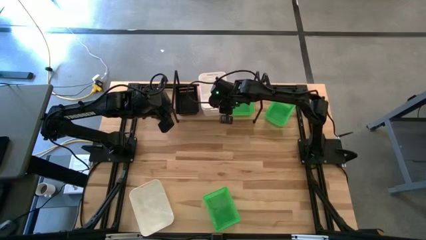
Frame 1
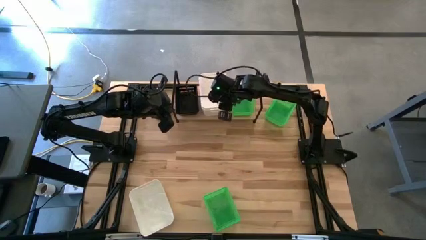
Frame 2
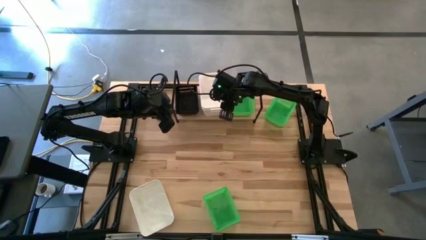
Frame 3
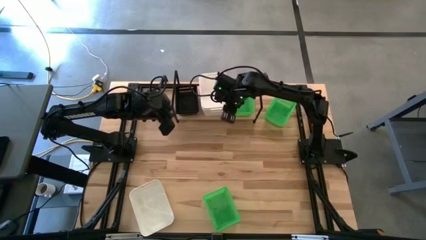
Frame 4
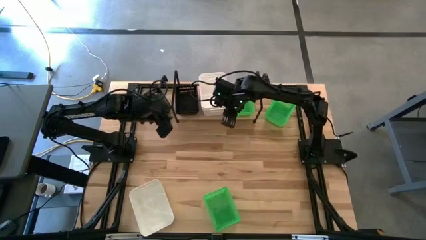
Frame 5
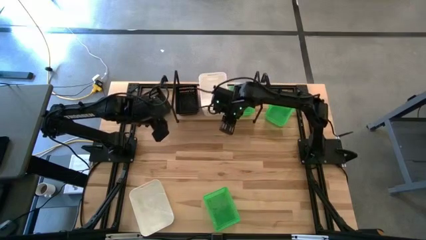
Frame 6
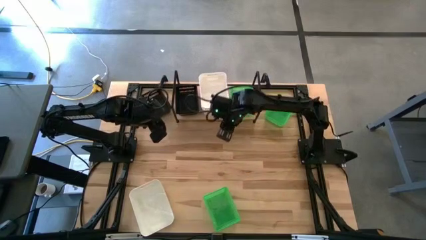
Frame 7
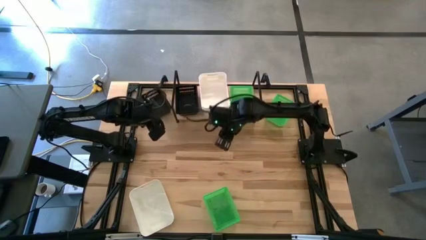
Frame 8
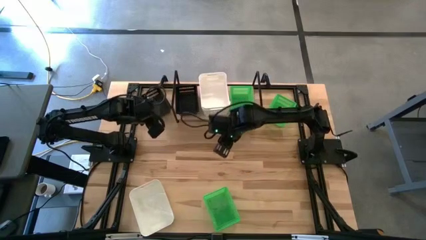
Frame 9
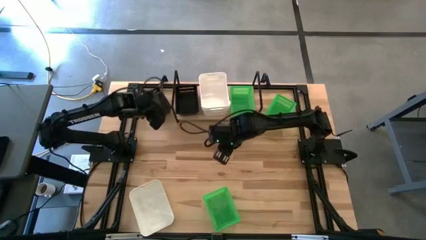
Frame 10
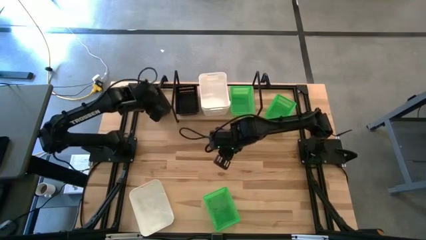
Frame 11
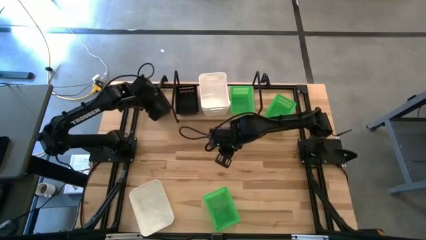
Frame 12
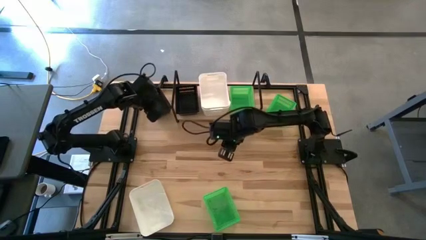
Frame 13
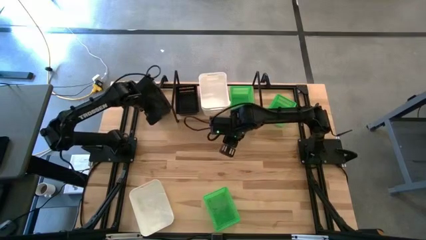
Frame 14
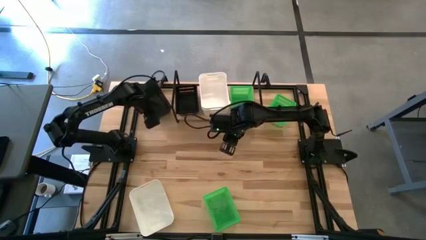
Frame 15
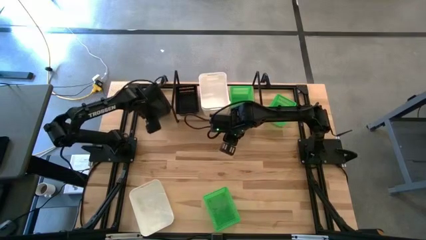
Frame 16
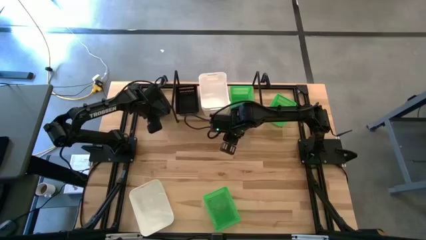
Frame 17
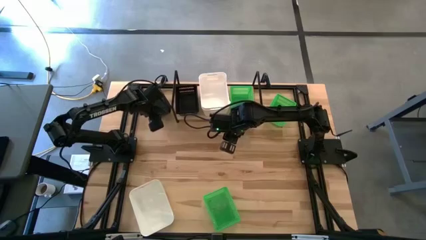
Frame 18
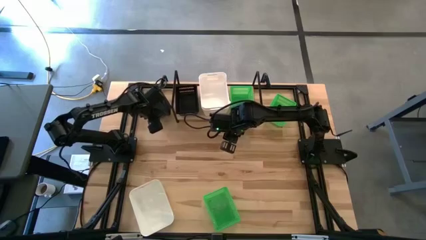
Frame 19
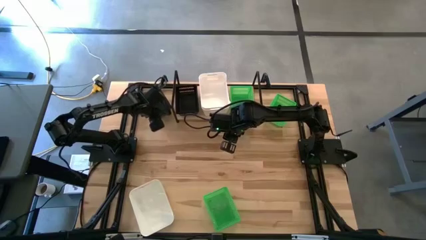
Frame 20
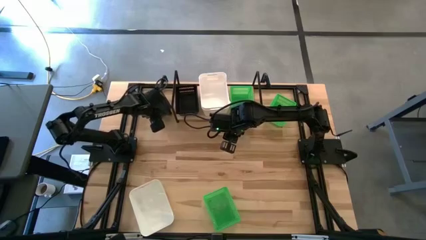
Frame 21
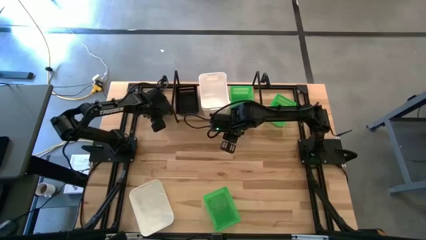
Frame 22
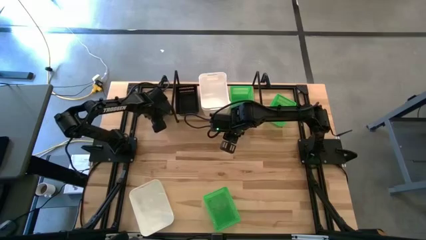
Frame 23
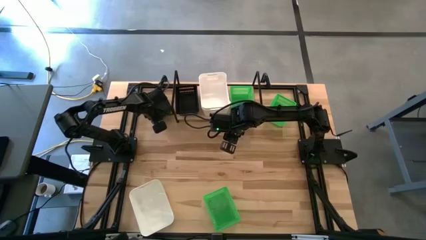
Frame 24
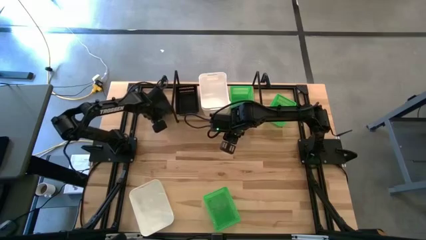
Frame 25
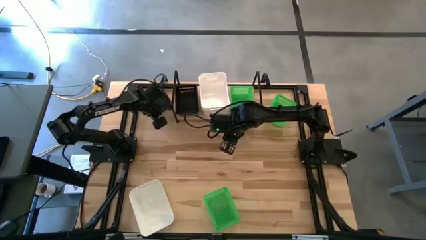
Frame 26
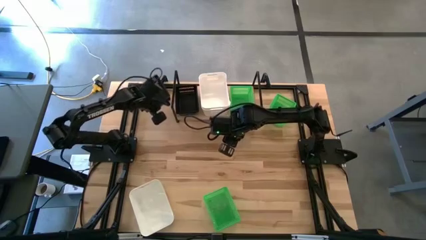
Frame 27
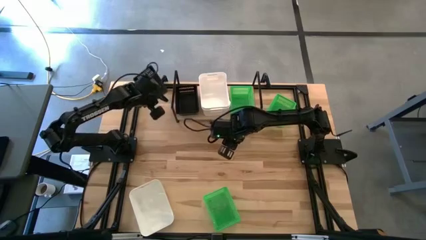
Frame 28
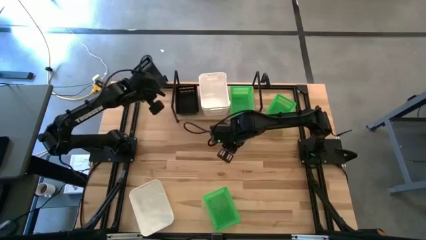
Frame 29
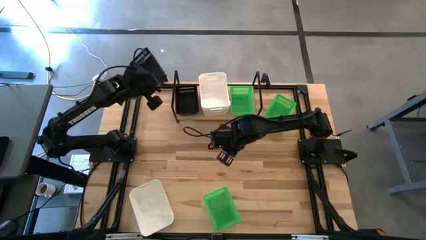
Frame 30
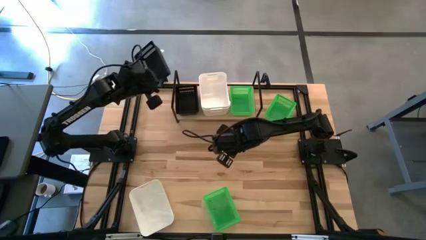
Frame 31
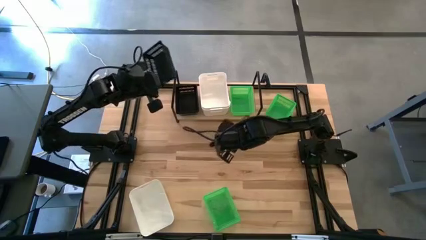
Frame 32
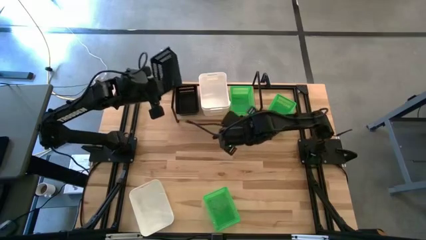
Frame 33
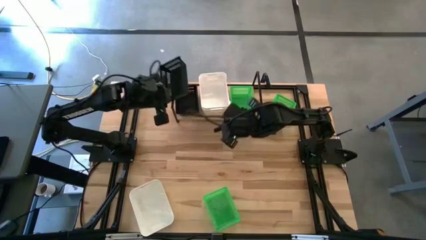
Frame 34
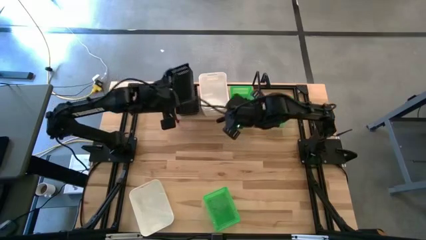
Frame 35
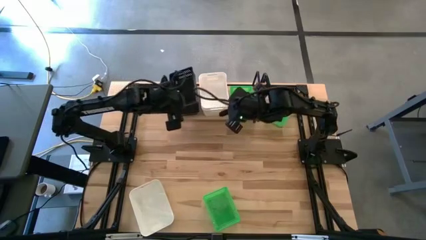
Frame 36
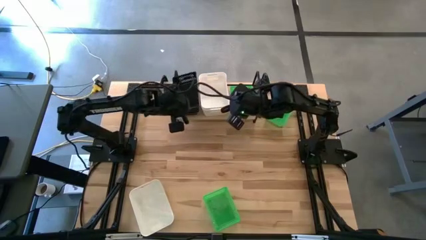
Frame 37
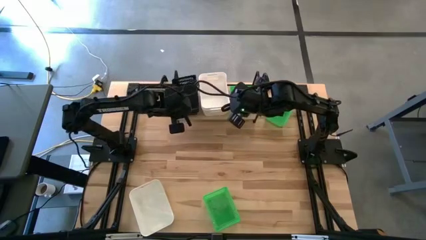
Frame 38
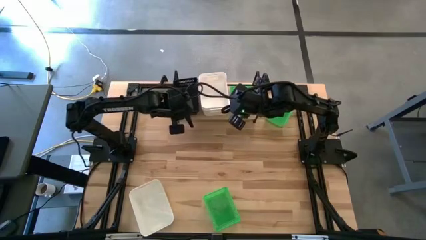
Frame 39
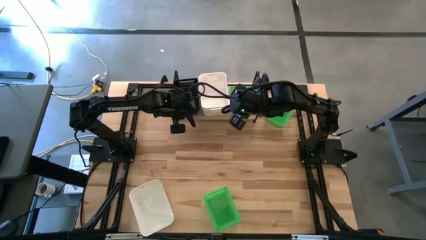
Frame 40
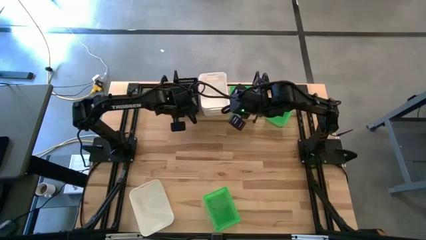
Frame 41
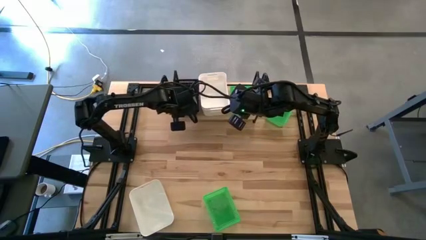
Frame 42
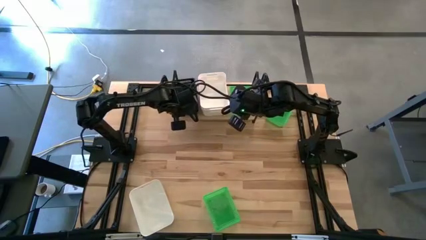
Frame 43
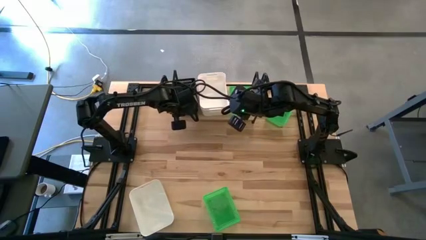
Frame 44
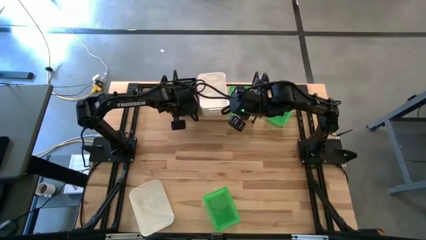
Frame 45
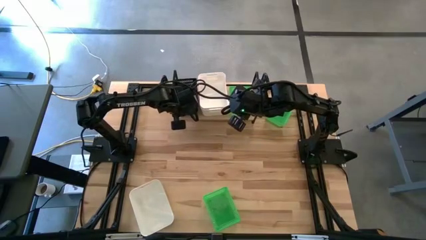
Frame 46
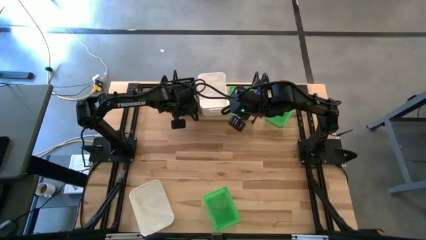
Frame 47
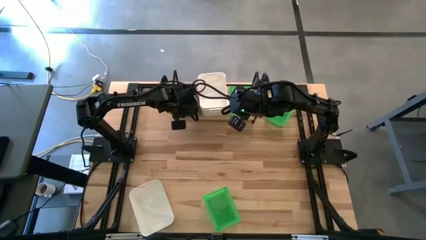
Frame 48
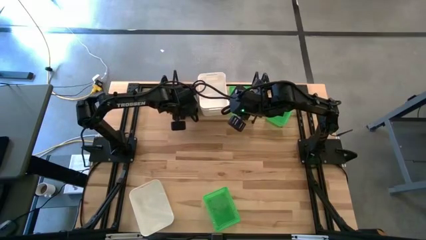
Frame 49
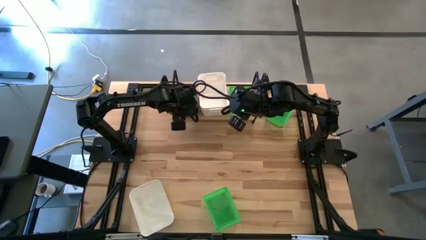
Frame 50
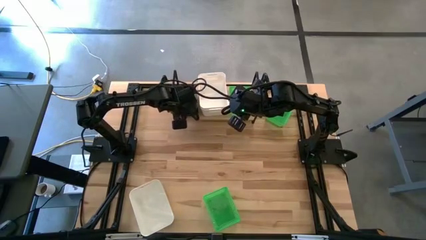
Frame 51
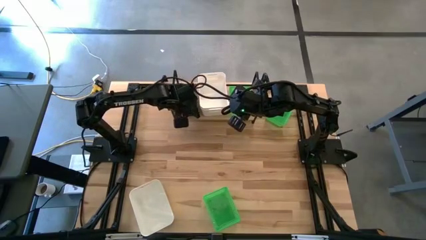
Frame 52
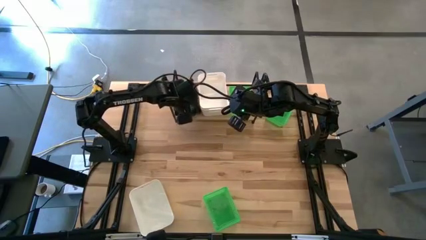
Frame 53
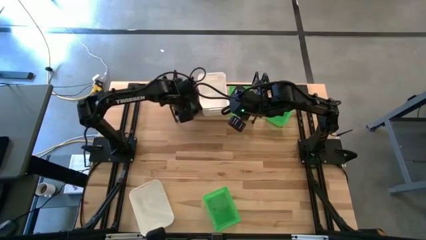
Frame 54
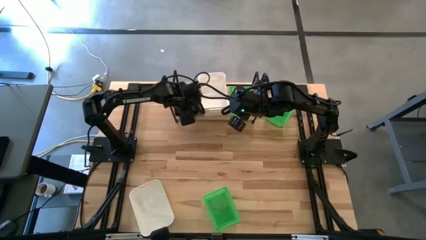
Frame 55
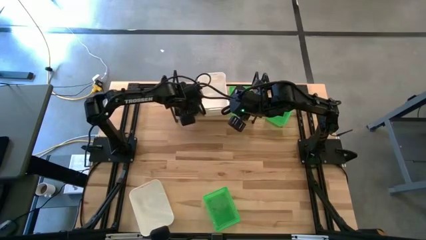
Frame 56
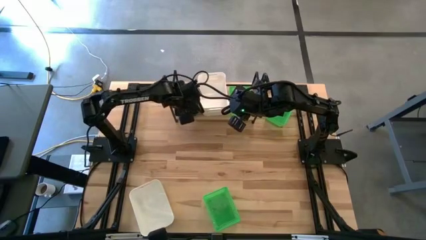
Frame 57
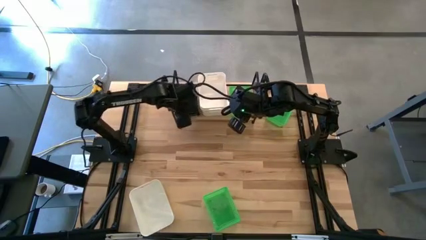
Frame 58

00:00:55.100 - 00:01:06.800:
Task: Stack baskets on shelf by color
Stack the black bin on top of the black bin on the shelf

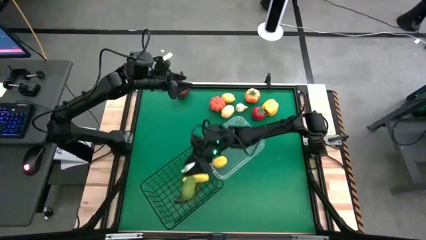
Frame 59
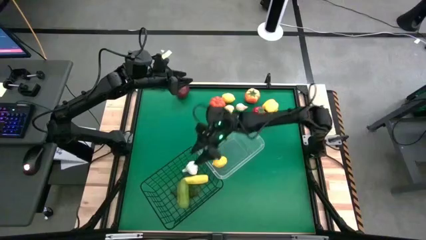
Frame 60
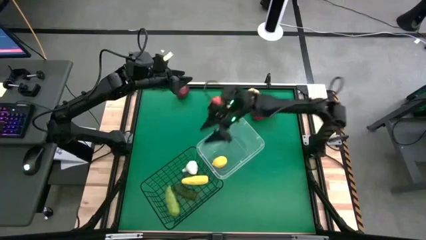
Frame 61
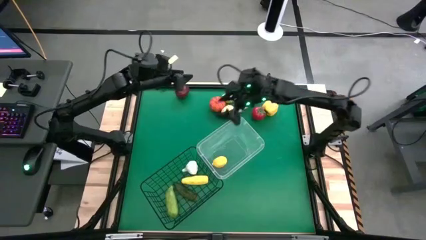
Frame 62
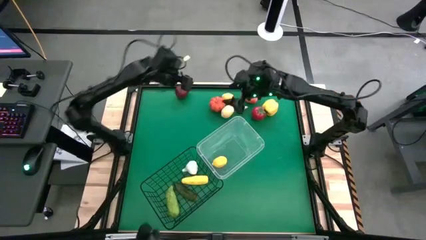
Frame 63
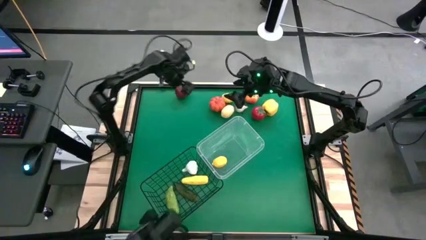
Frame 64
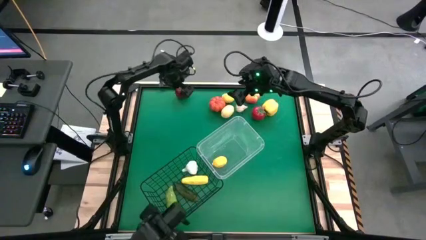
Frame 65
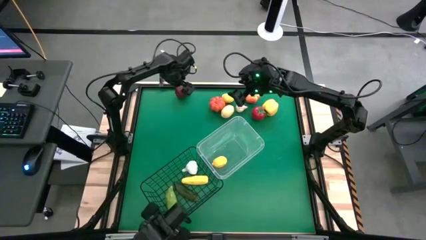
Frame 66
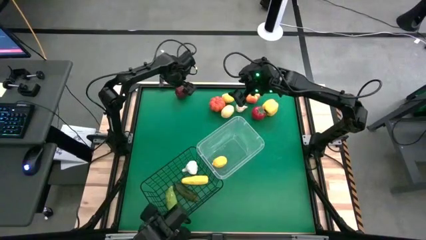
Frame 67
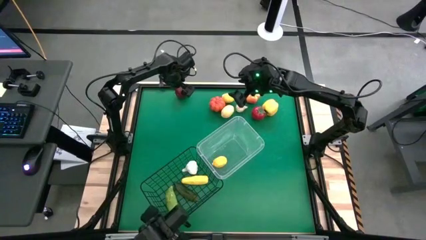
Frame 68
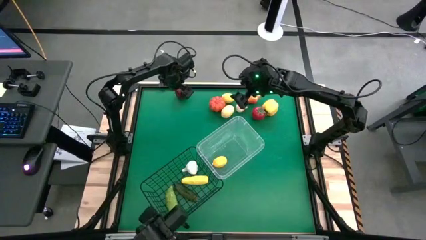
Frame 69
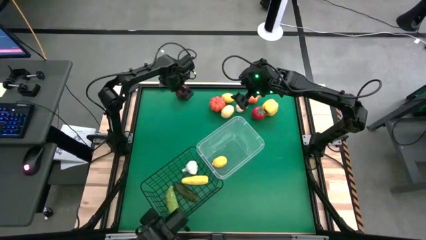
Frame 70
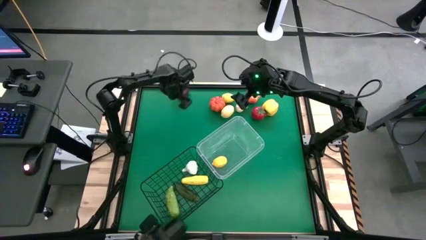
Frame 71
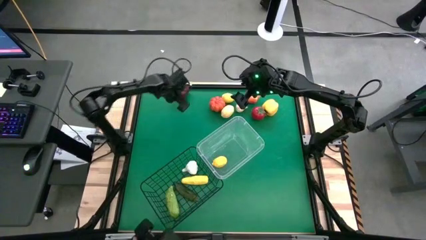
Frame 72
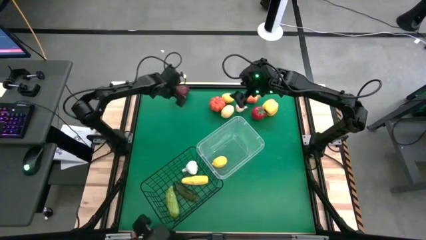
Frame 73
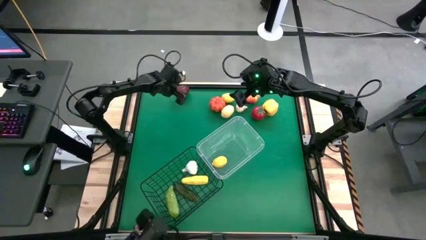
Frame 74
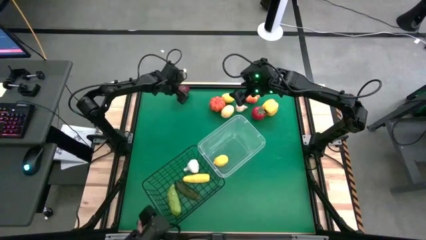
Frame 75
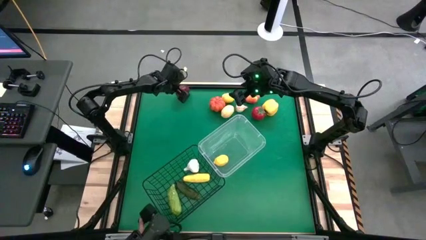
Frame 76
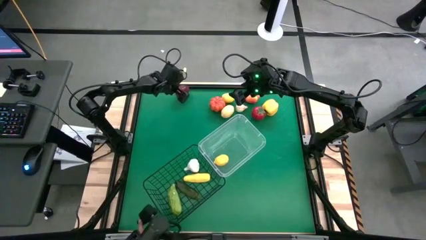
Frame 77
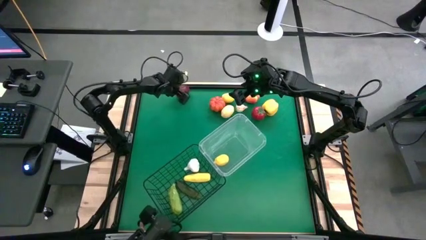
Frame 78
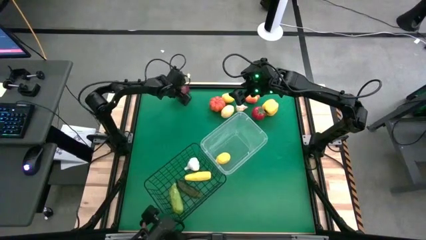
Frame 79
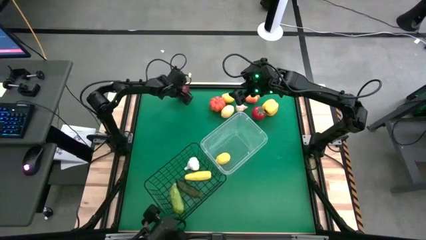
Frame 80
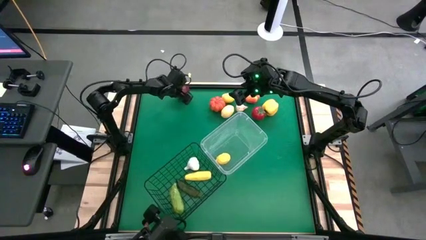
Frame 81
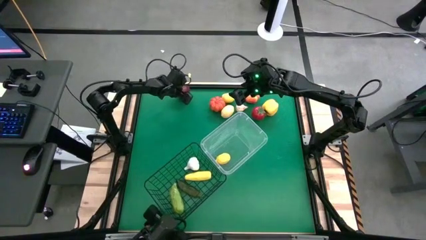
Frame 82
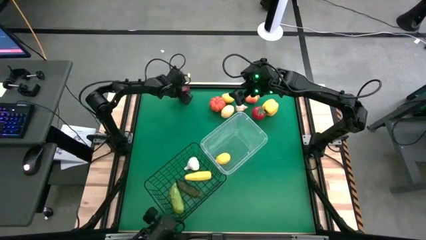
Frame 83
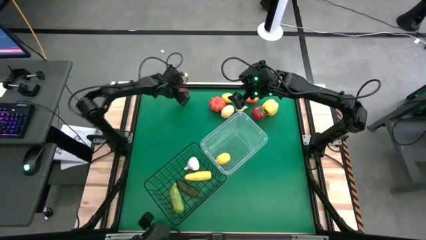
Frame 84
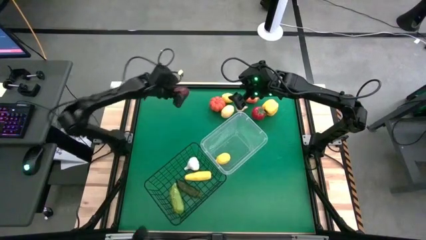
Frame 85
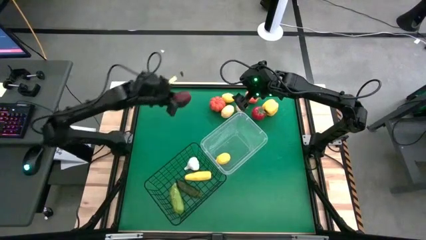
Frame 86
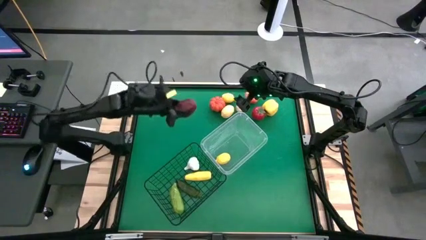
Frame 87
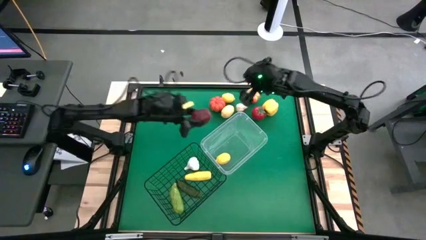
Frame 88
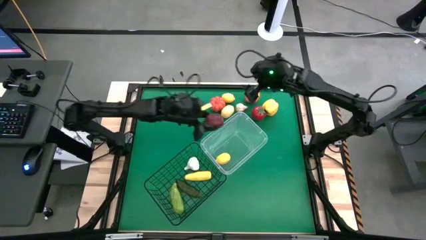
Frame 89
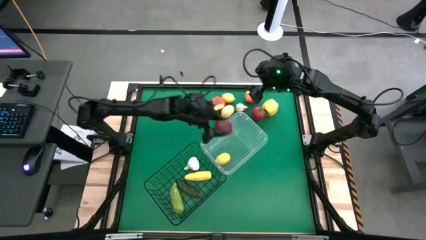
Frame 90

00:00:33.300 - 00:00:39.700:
Task: Sort produce into baskets
Put the apple into the transparent bin
